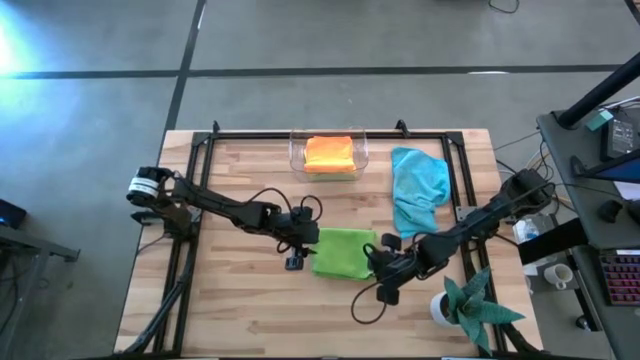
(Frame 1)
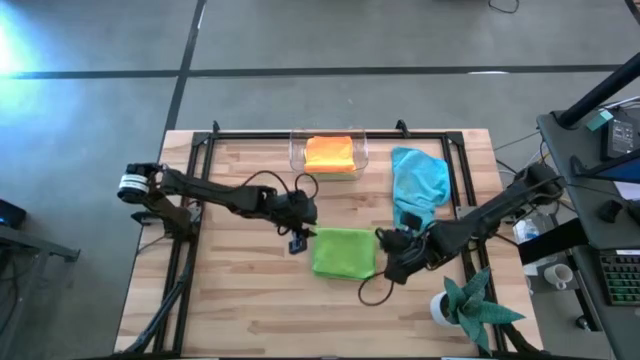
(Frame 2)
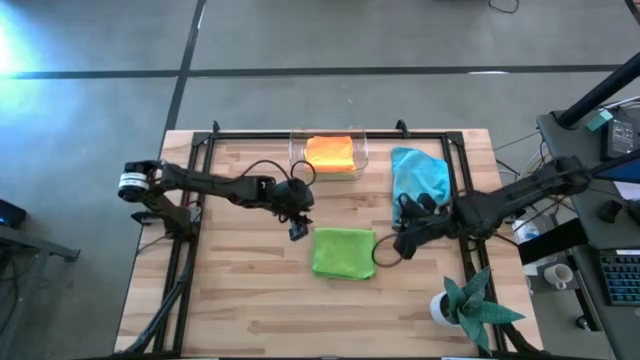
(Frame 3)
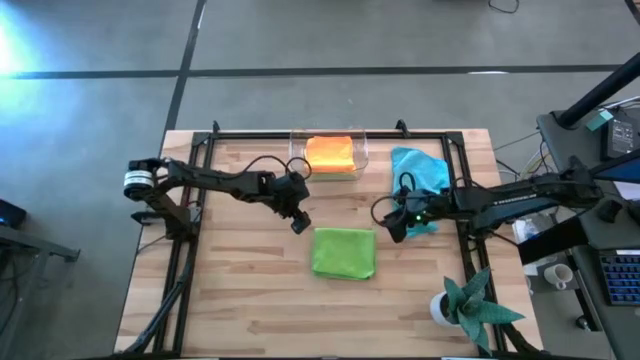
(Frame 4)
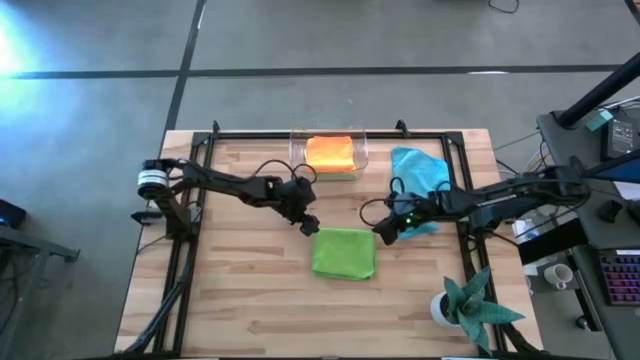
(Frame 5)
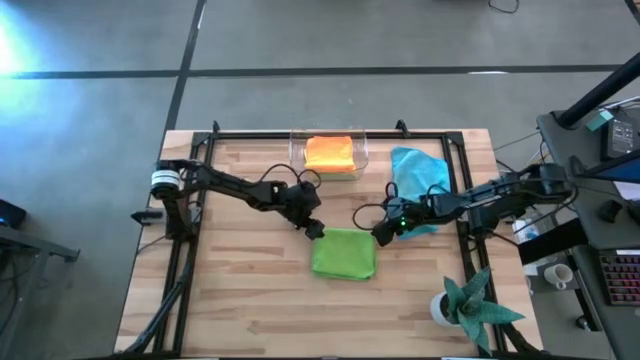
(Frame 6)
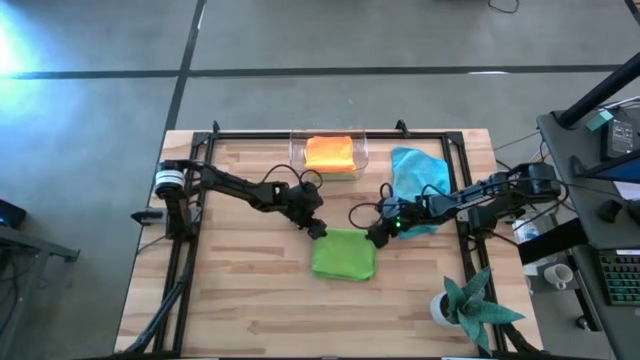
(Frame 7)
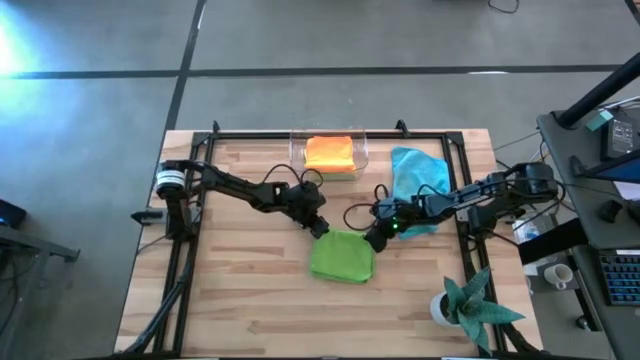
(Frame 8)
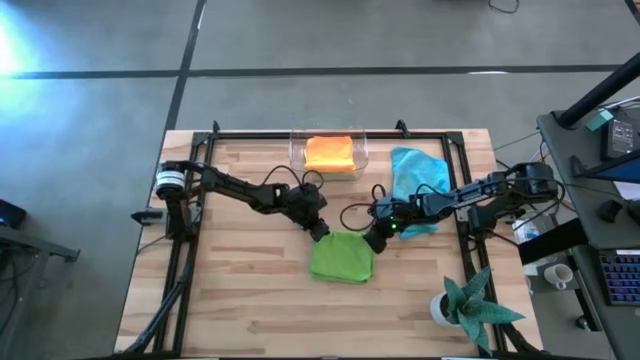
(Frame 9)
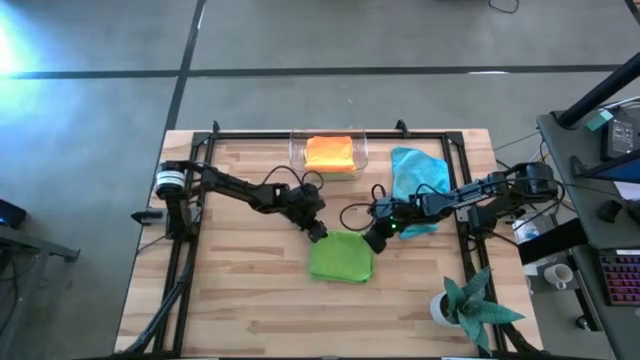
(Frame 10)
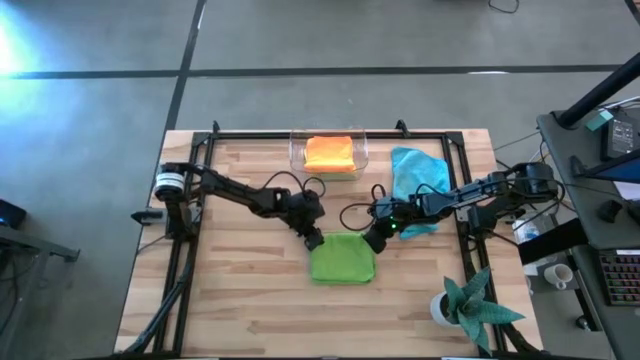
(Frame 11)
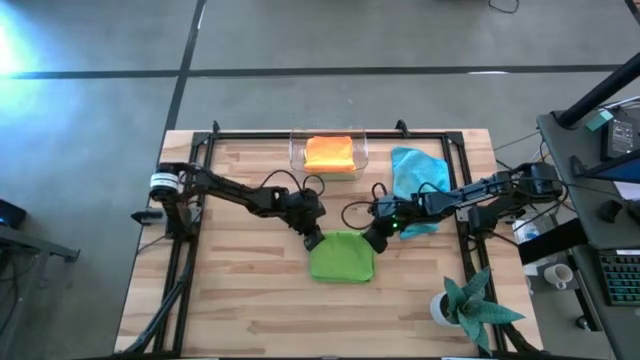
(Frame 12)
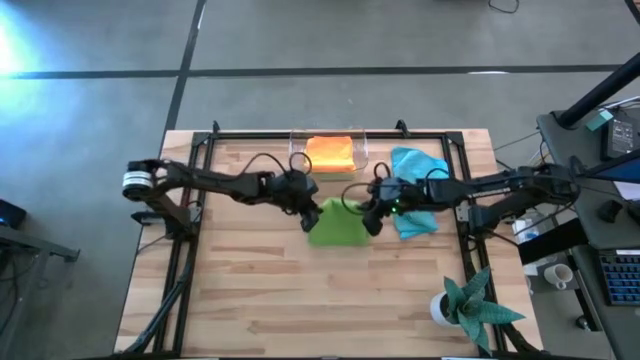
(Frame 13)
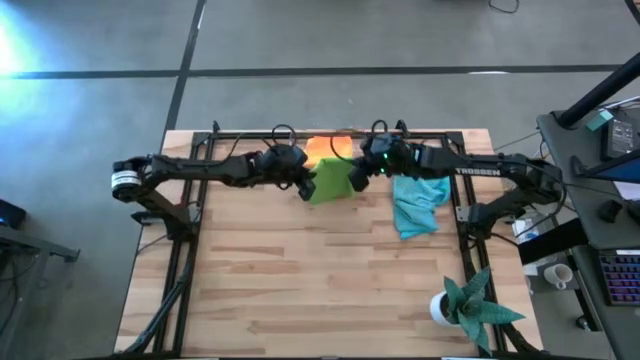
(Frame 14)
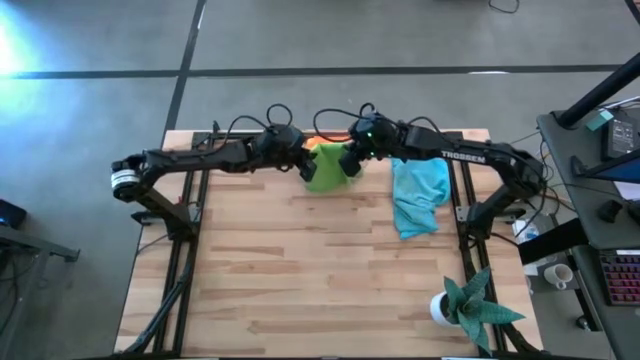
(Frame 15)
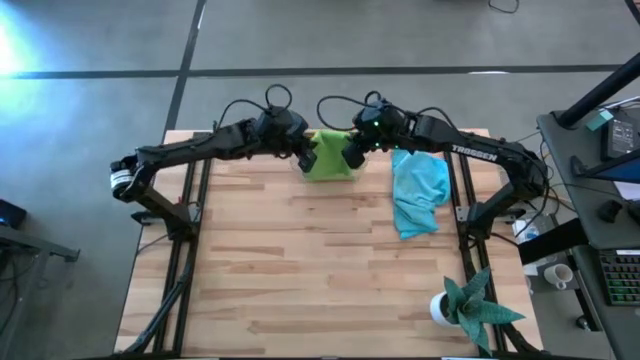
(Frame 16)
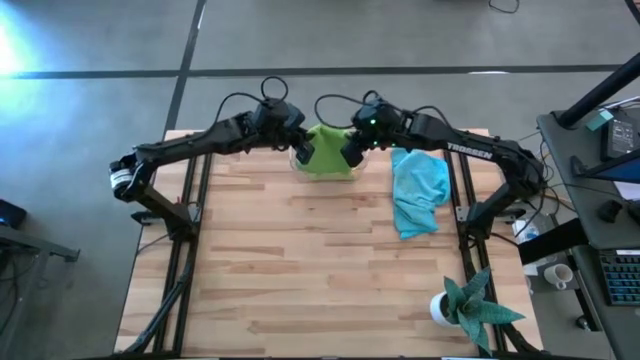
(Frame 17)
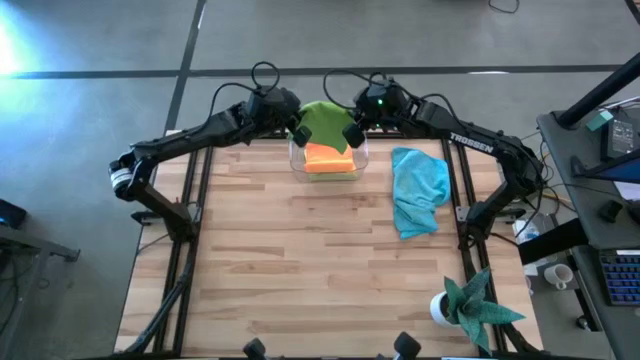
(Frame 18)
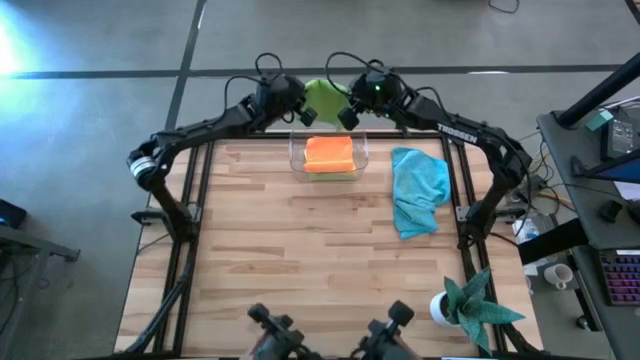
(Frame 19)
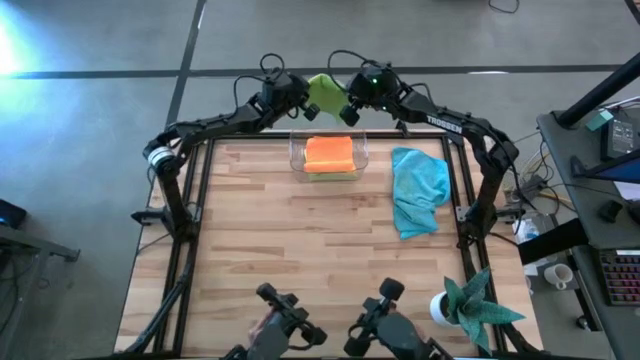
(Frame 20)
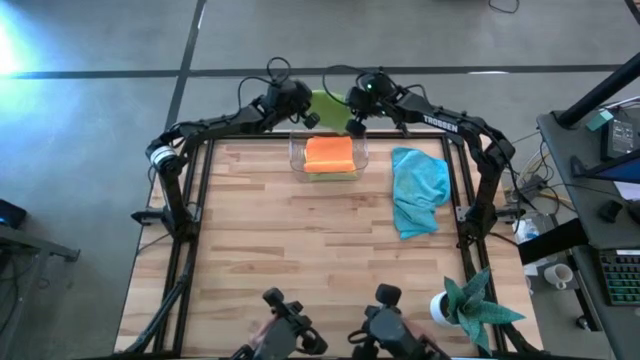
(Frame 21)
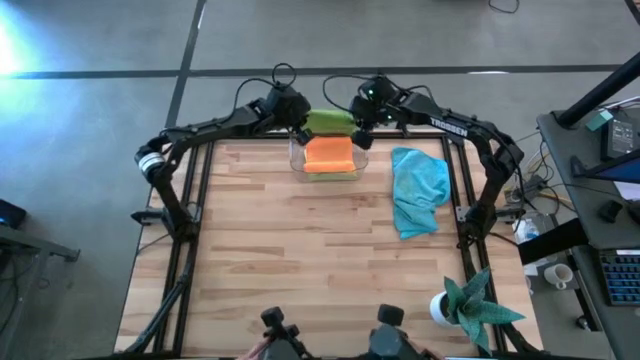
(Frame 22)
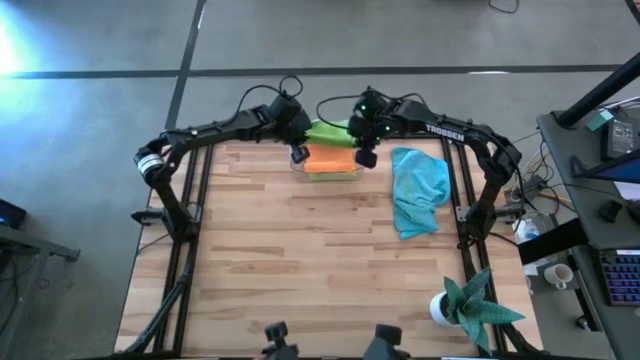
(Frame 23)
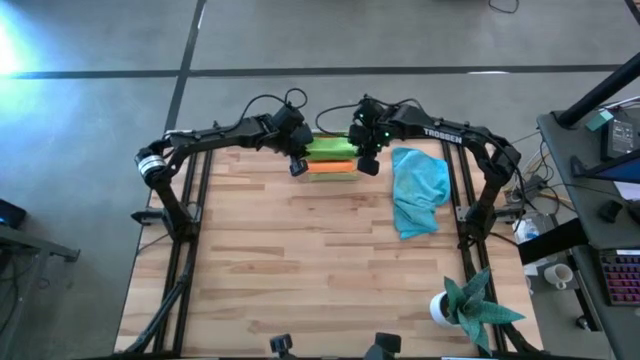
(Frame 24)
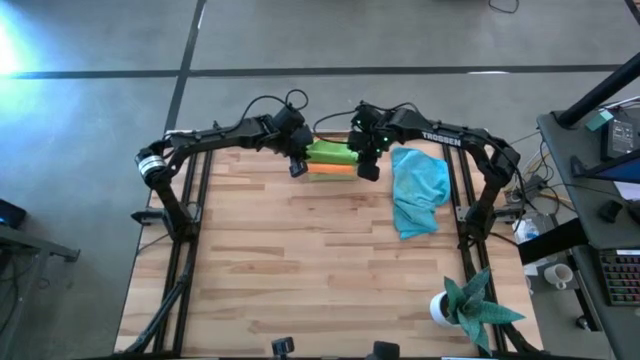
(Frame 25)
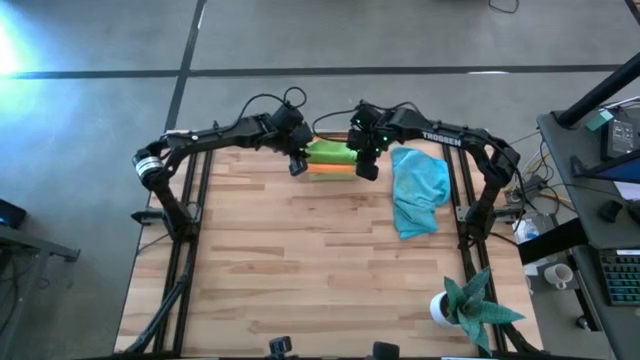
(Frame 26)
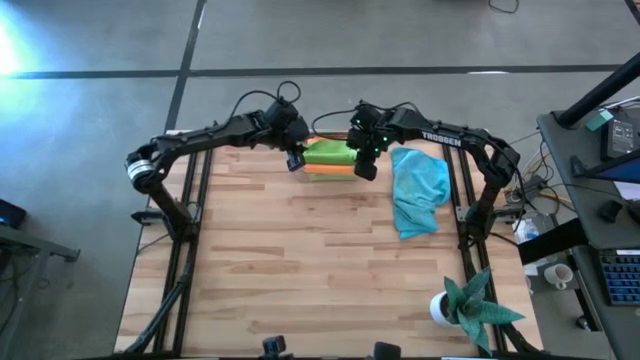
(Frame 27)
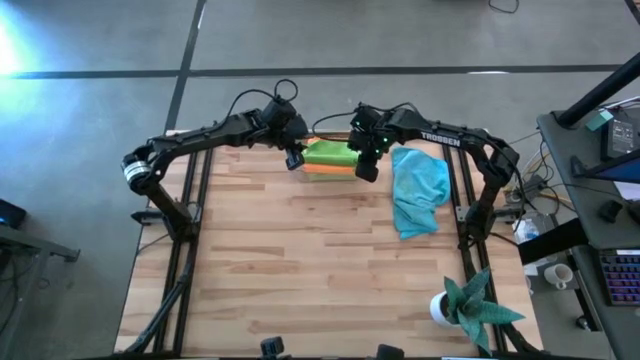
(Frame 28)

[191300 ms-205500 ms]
Task: Fold microfiber towels
Put the green microfiber towel into the transparent bin

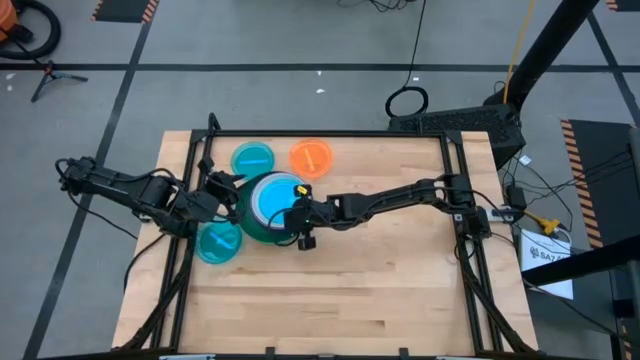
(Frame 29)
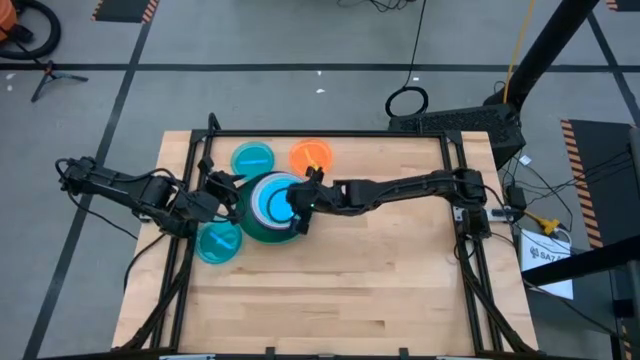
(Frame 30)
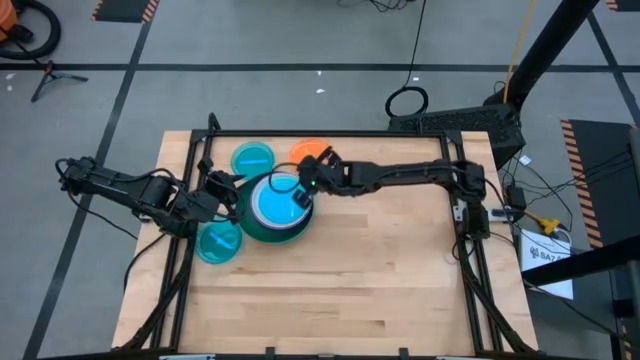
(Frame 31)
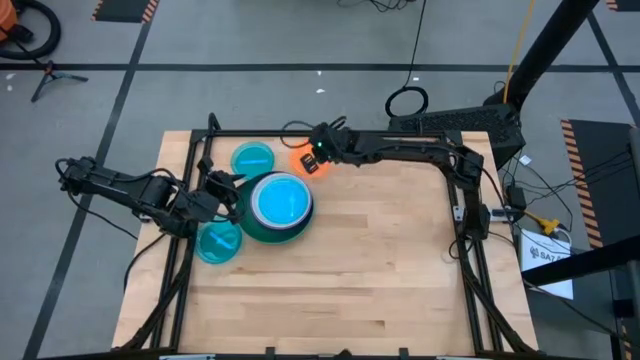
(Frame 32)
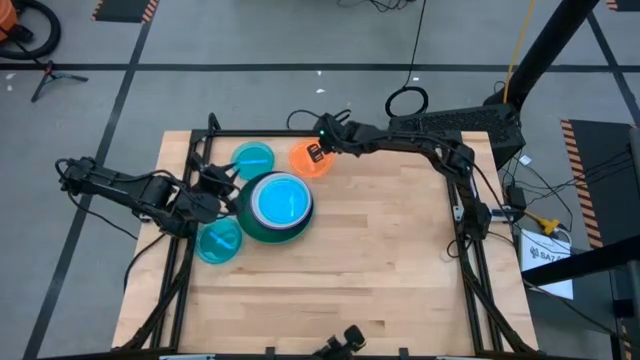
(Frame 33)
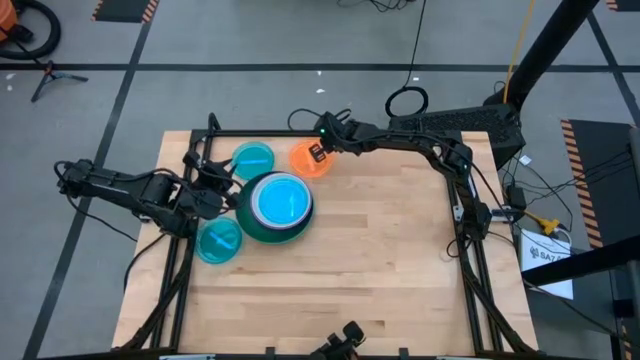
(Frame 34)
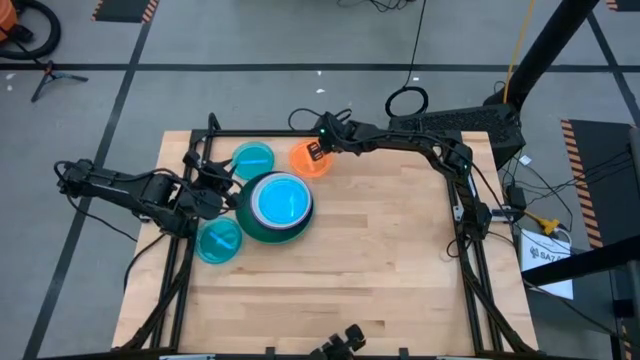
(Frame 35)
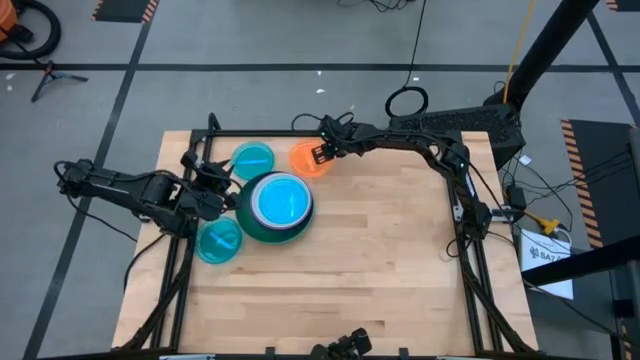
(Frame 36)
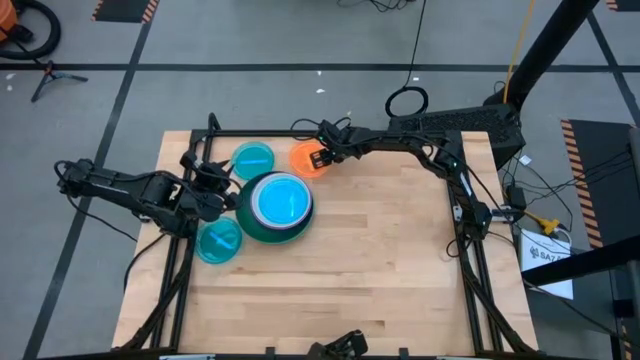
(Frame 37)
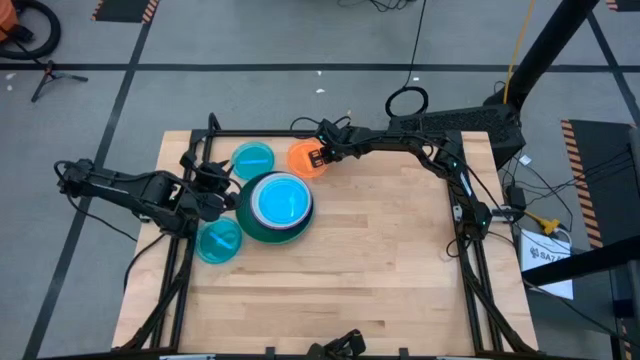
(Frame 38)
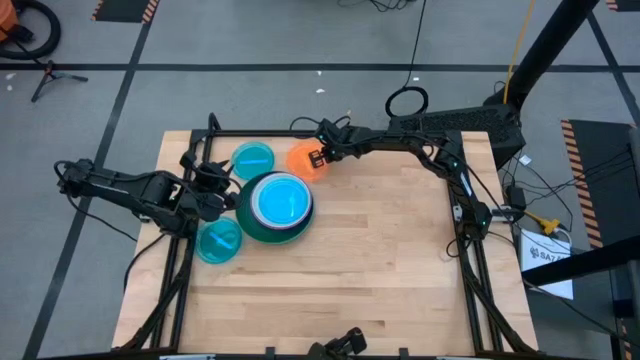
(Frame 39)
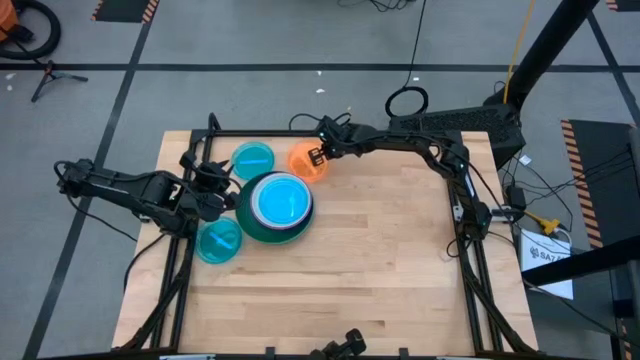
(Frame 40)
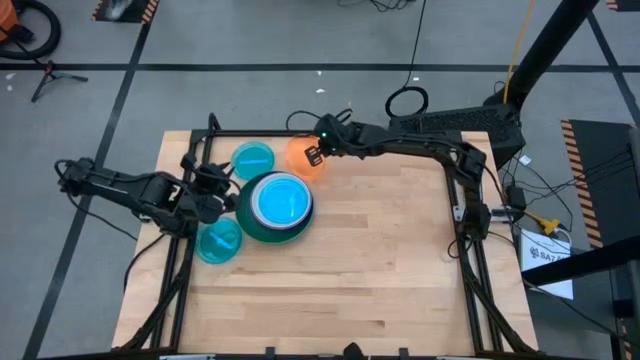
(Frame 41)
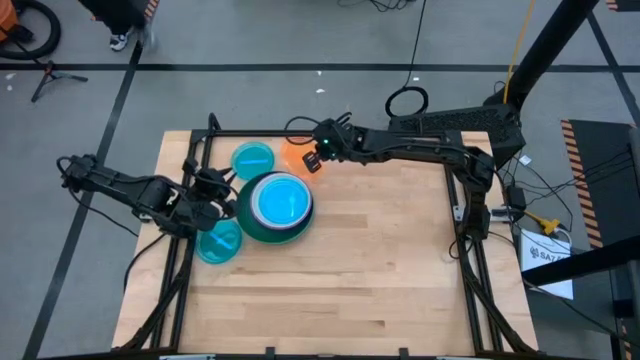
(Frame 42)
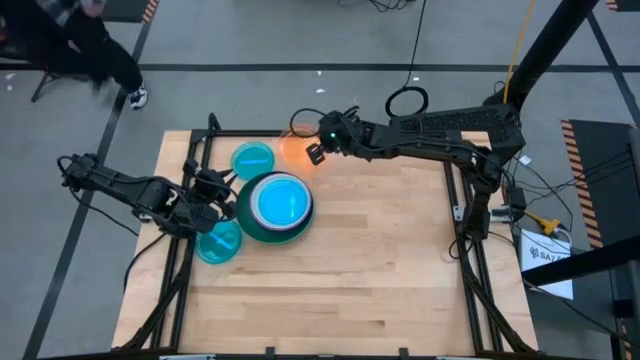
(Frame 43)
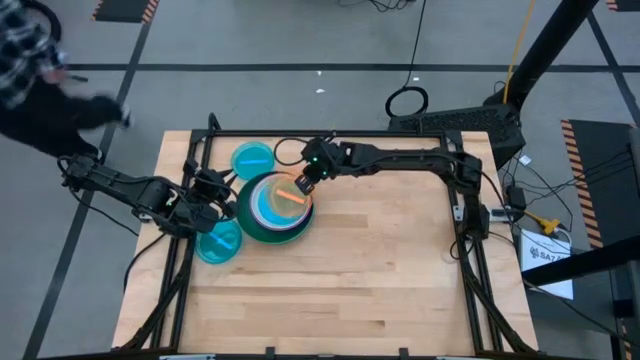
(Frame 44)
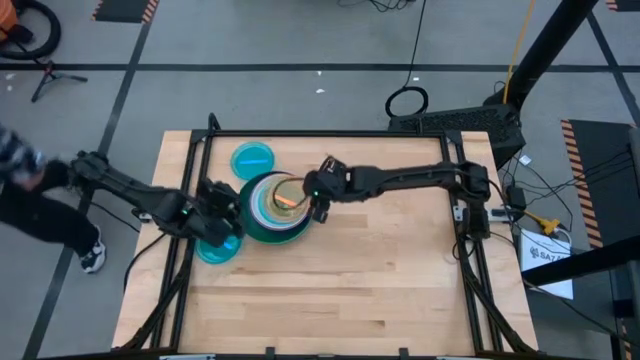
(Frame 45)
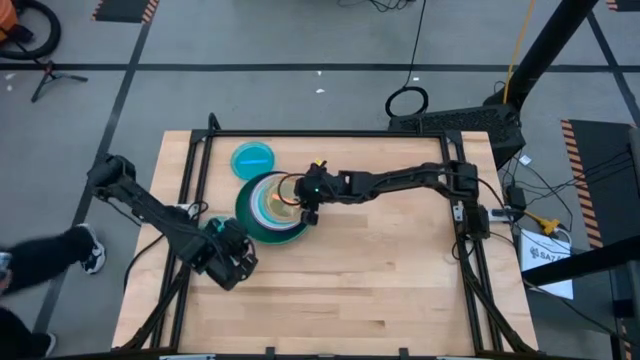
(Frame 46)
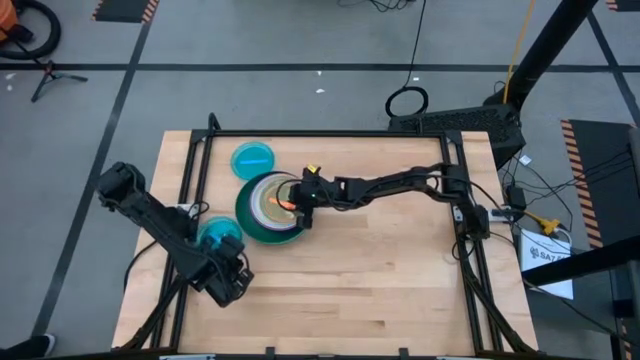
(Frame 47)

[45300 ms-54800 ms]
Task: Stack plastic plates
Stack the orange plate on top of the blue plate
